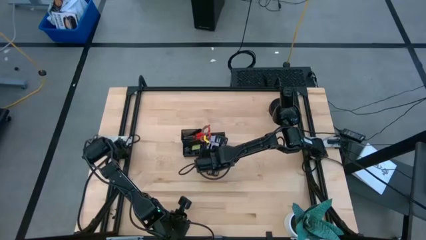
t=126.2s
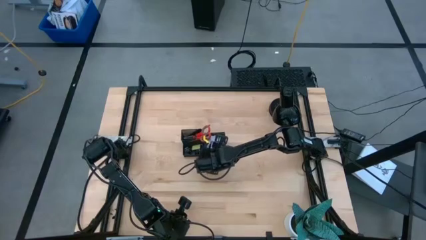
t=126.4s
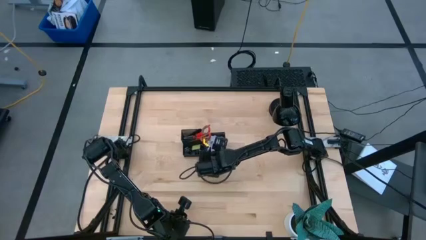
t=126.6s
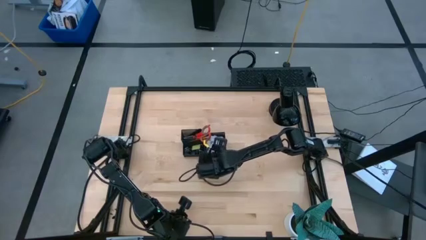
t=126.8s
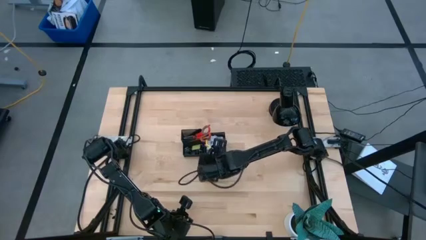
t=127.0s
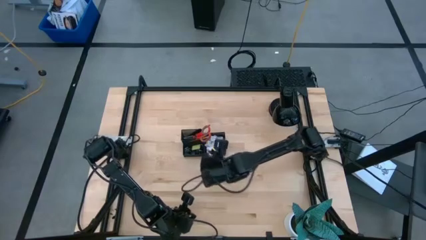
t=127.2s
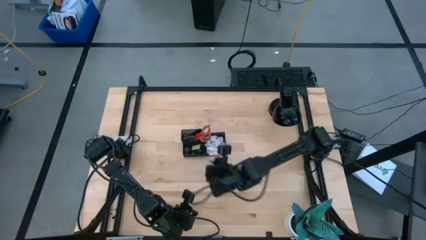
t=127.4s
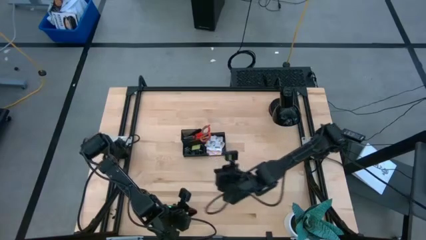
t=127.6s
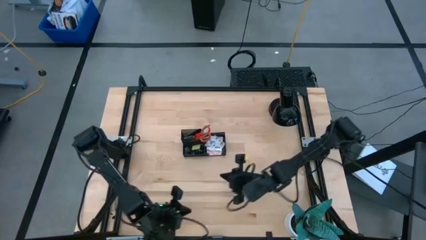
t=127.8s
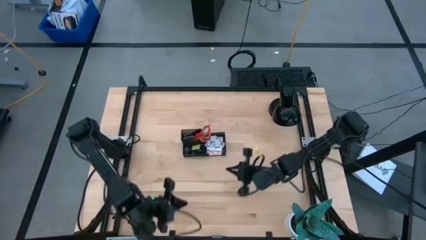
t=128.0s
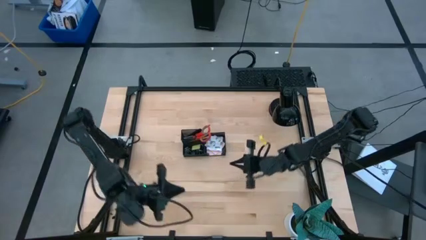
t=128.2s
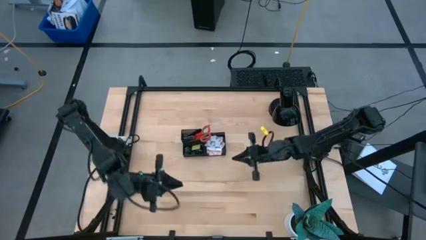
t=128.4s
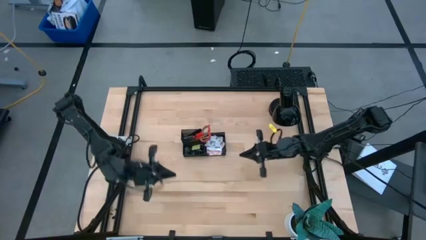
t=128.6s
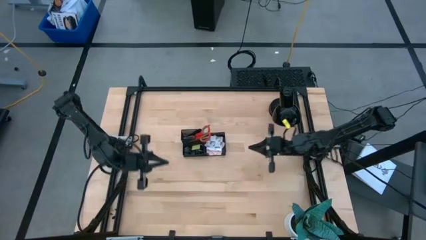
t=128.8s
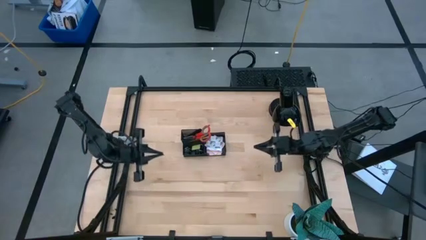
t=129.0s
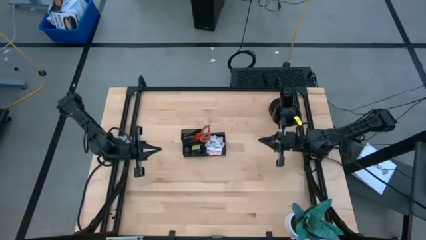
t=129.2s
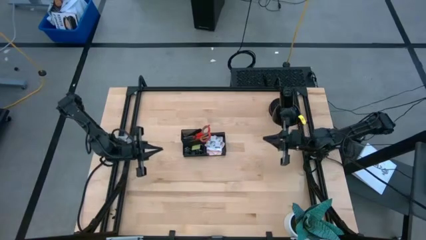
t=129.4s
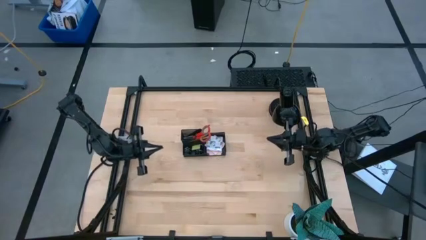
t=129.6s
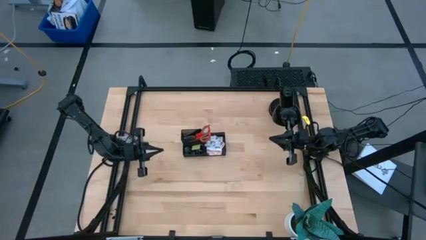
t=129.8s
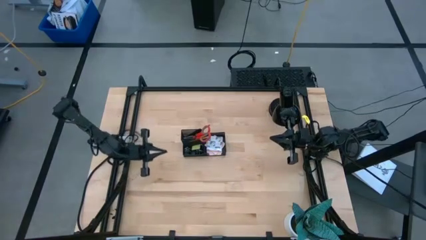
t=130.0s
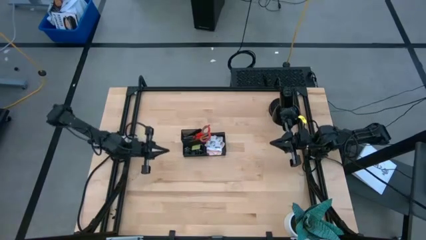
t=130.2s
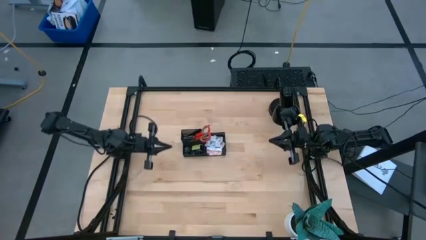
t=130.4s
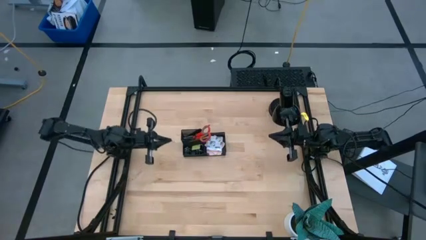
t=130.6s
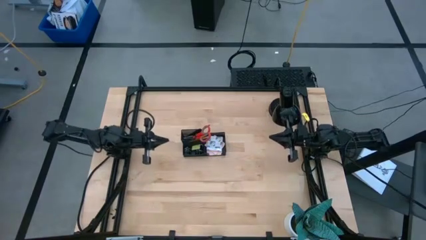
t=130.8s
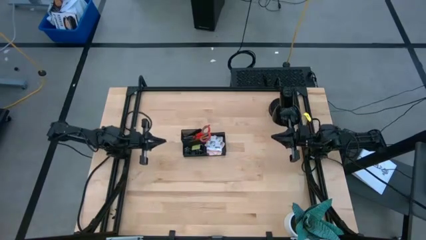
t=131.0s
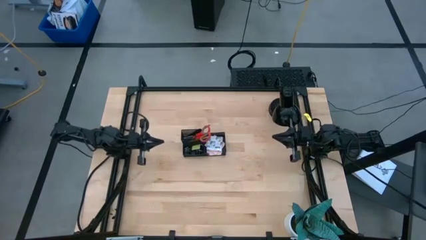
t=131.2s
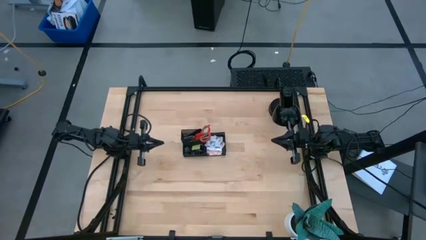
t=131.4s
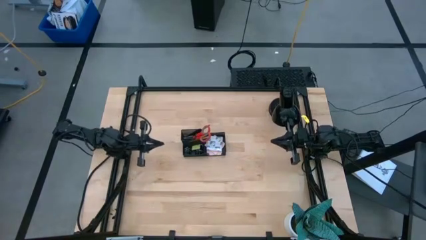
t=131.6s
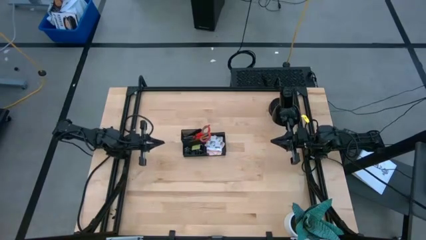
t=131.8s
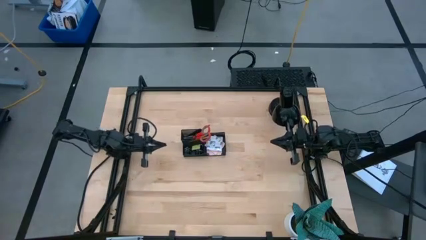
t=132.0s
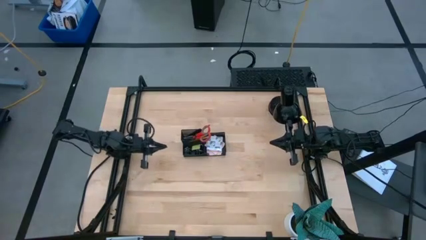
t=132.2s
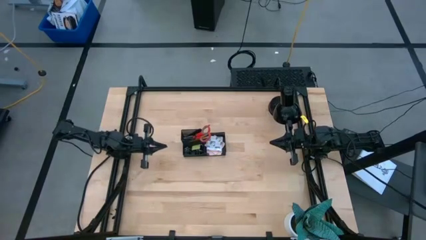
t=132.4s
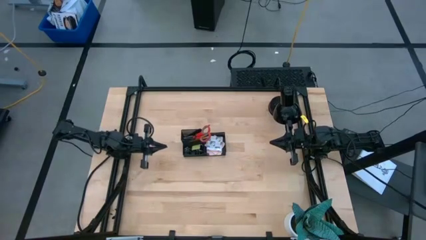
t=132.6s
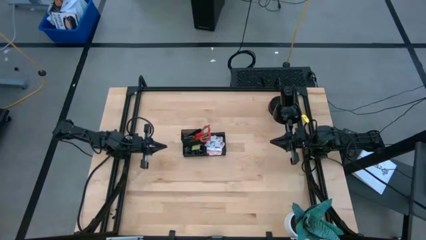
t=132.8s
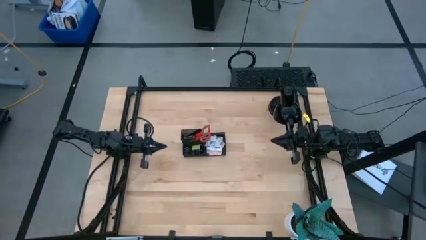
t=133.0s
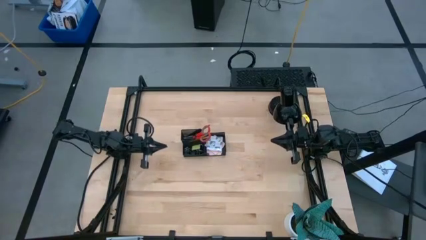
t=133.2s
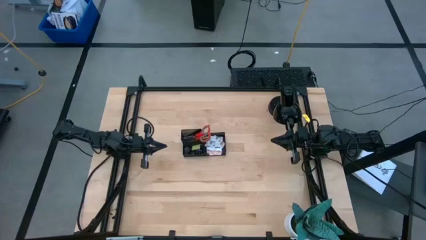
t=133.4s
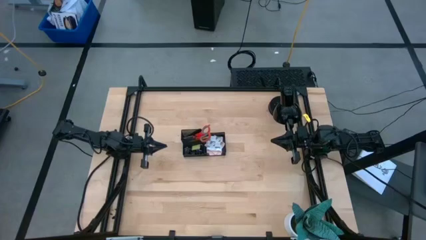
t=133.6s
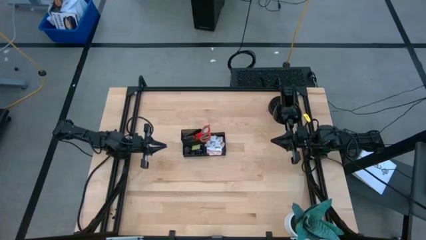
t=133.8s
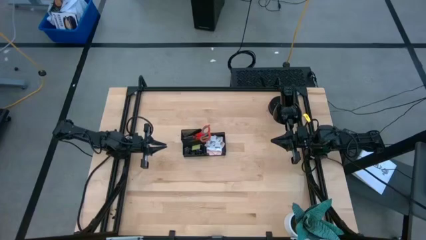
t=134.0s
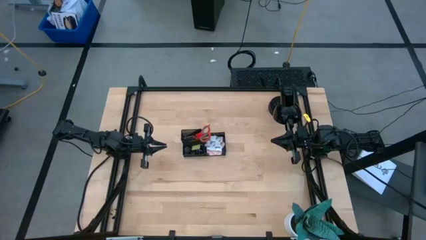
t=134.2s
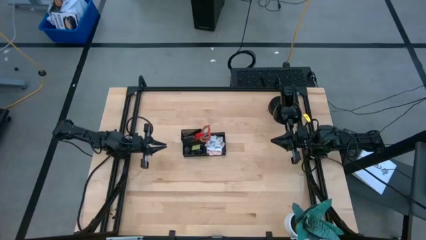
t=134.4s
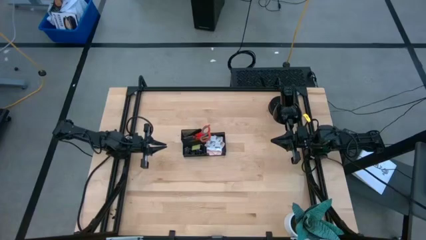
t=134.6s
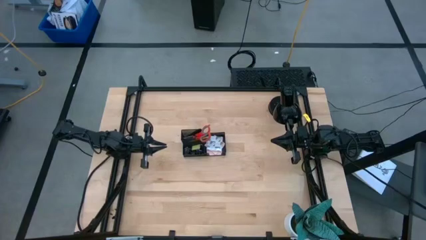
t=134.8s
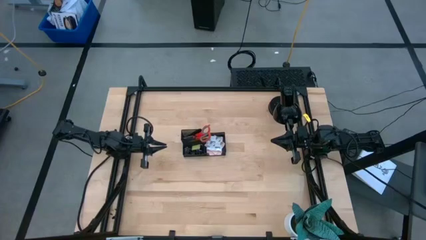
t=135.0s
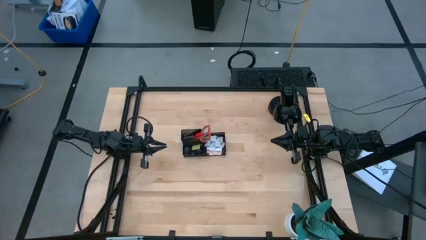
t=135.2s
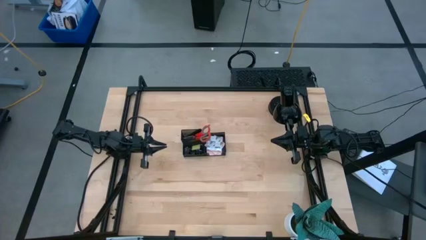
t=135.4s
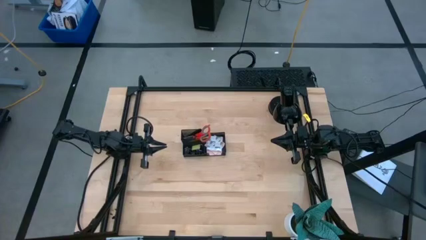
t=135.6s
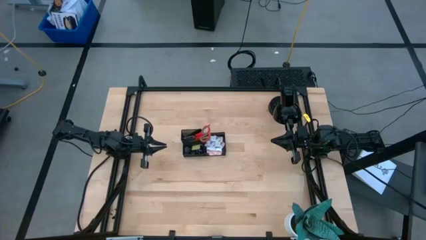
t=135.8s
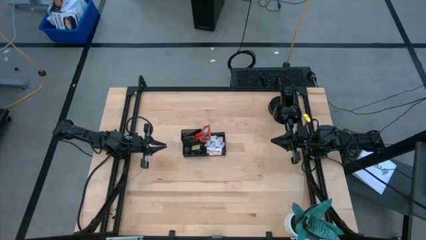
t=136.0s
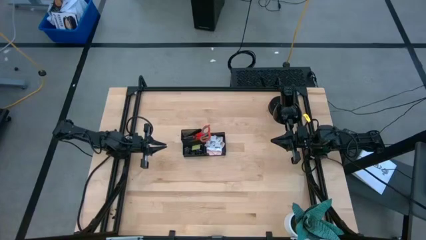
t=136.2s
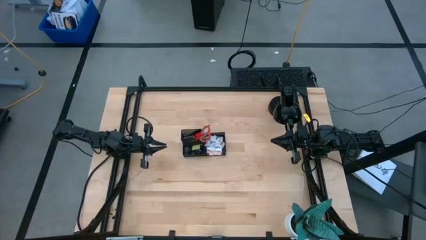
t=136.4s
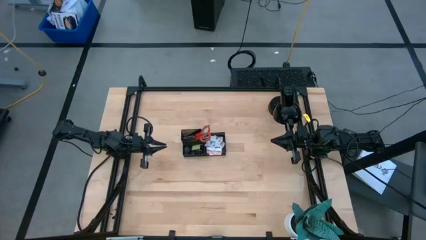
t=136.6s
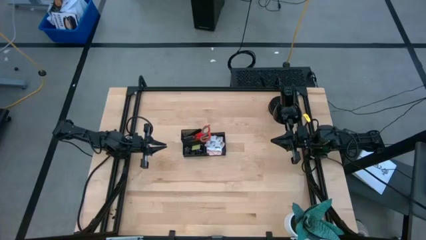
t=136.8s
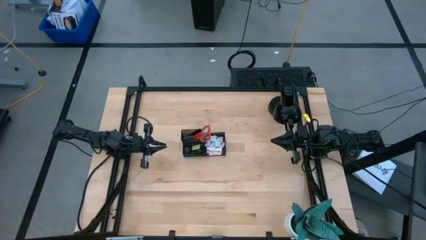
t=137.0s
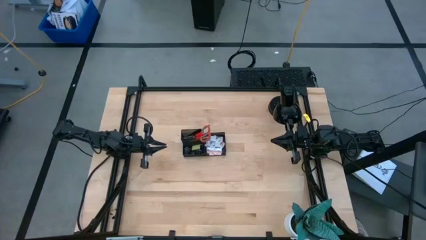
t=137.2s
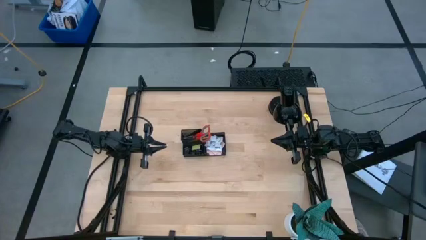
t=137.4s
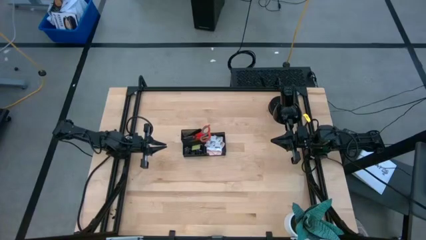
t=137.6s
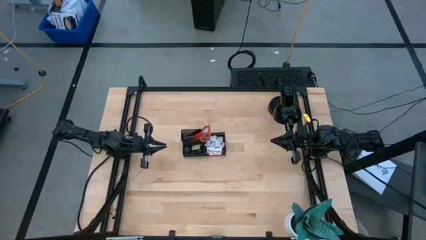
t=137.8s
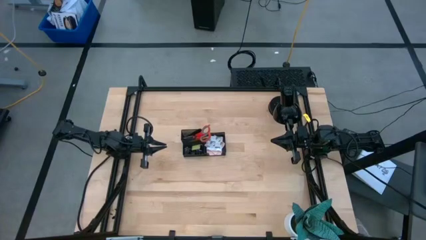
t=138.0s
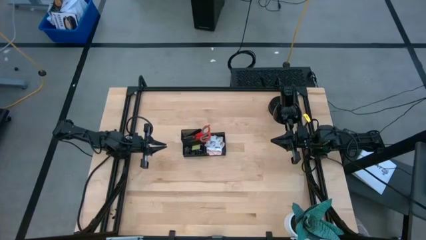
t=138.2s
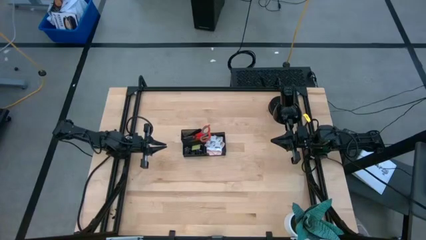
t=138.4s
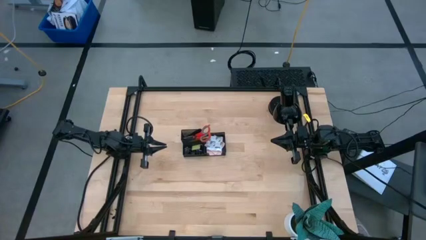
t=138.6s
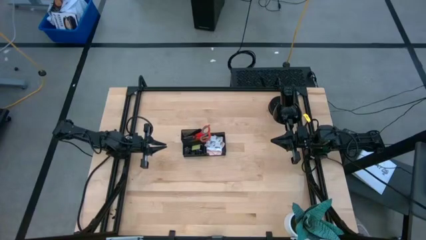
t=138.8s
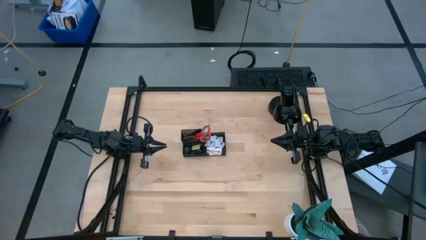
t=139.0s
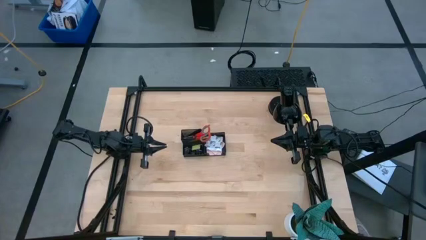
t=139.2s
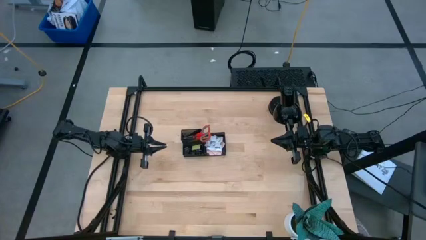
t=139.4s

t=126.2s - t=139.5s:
Task: Pick and place office supplies into organizer
Return to Home Position
